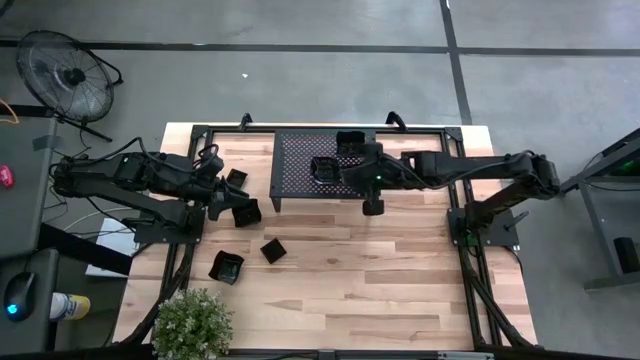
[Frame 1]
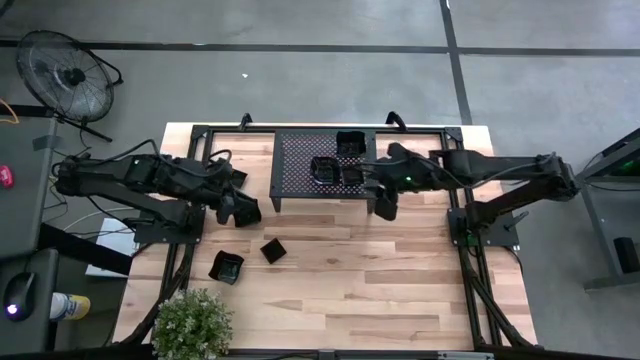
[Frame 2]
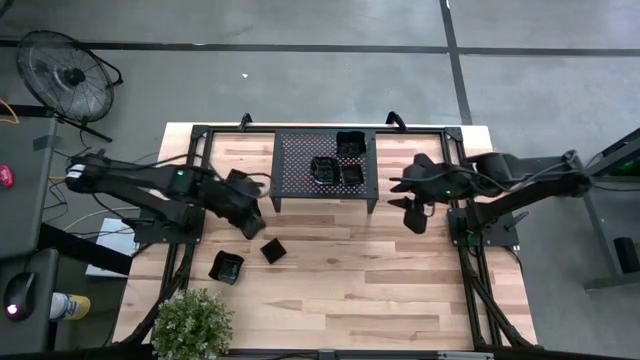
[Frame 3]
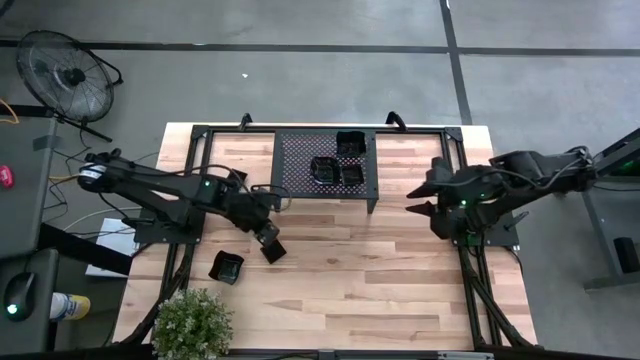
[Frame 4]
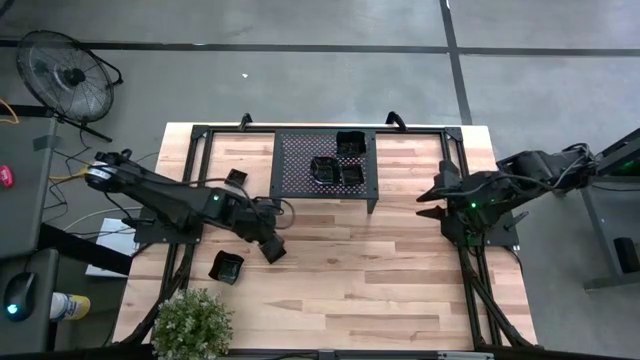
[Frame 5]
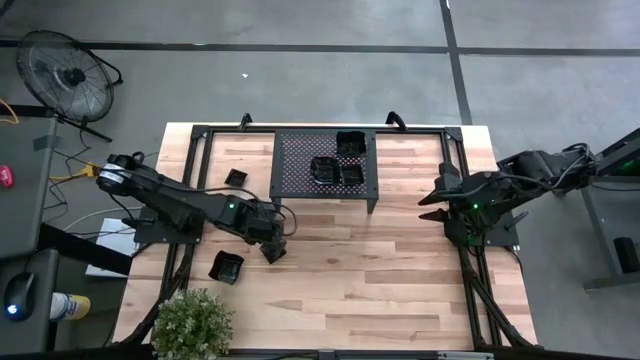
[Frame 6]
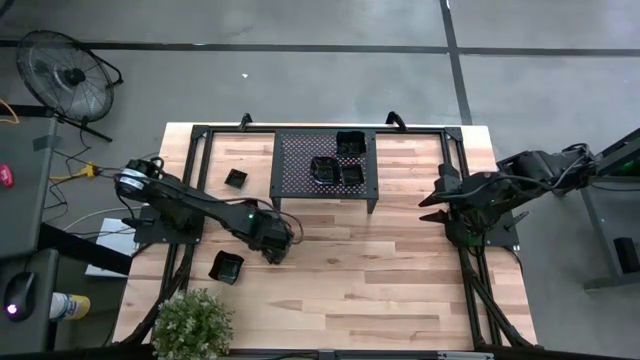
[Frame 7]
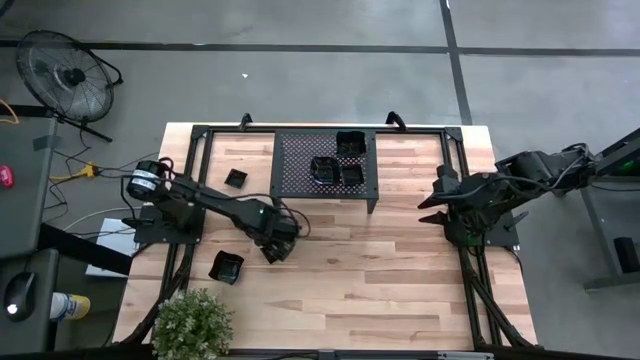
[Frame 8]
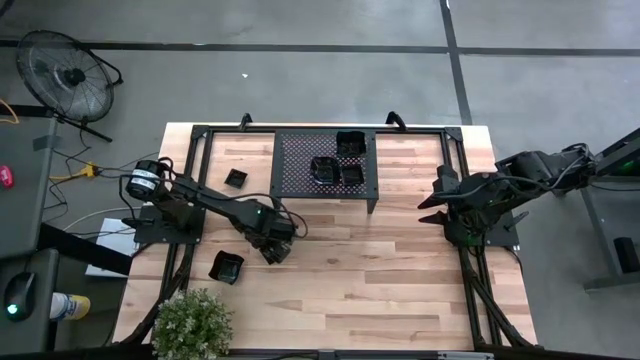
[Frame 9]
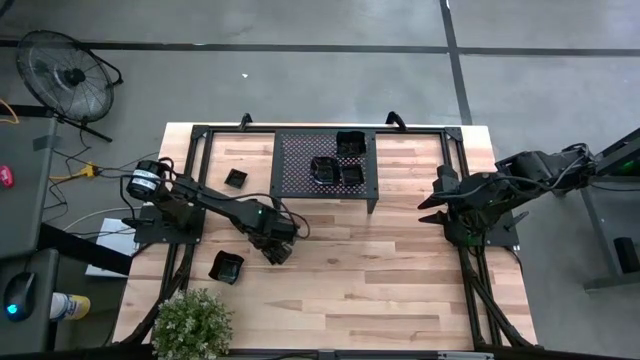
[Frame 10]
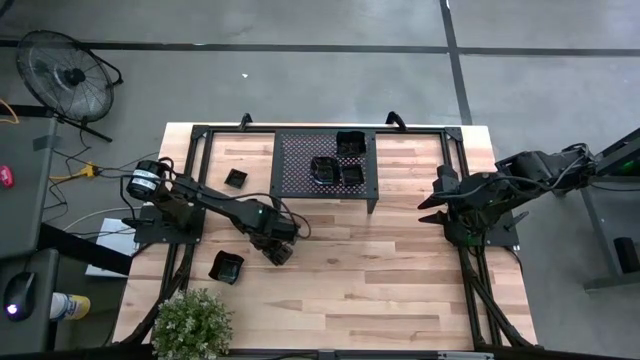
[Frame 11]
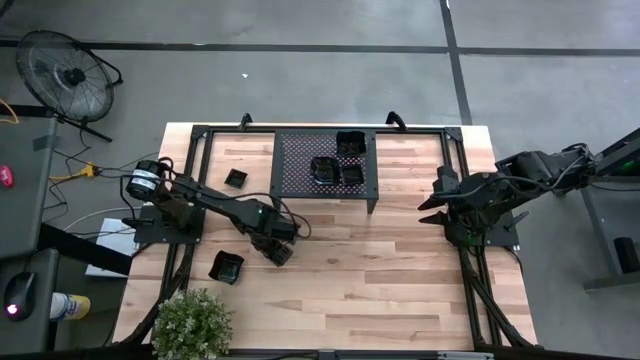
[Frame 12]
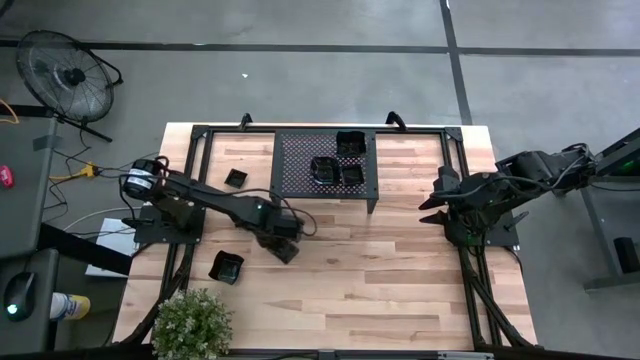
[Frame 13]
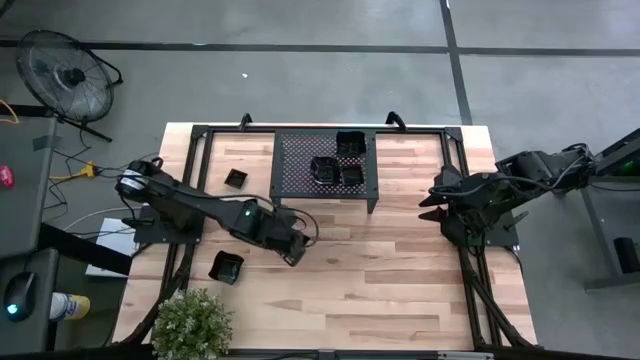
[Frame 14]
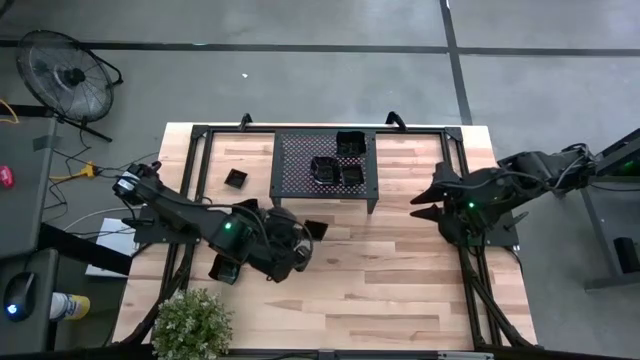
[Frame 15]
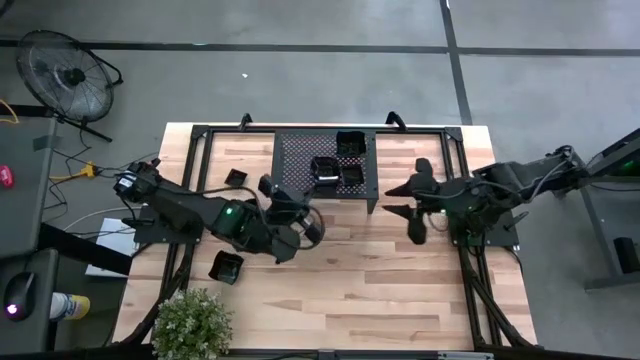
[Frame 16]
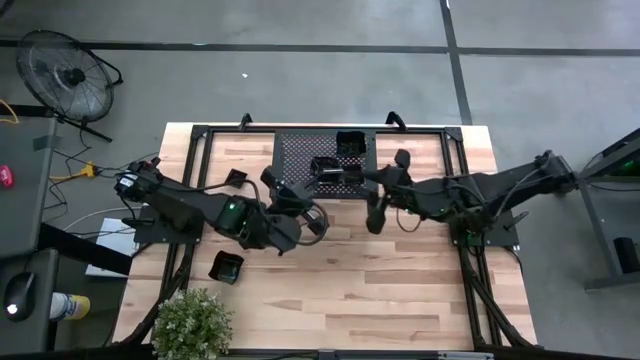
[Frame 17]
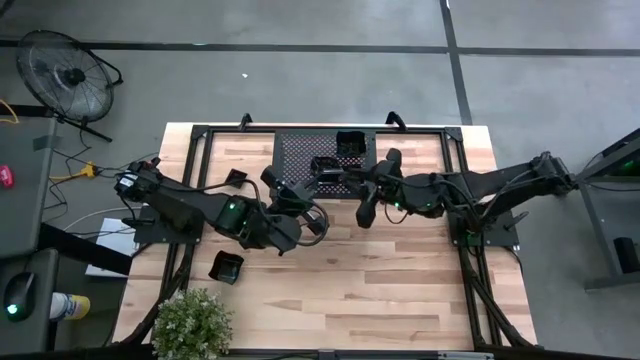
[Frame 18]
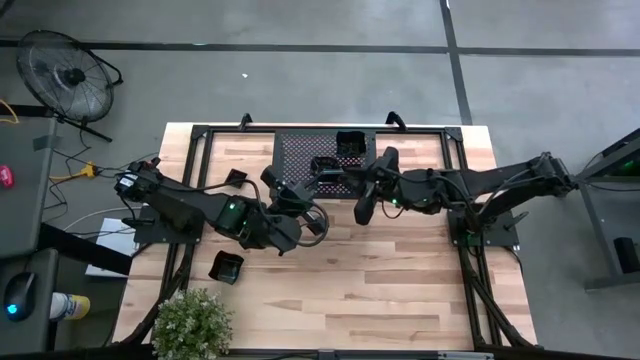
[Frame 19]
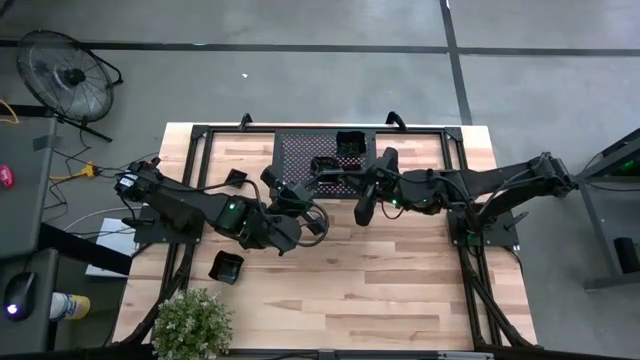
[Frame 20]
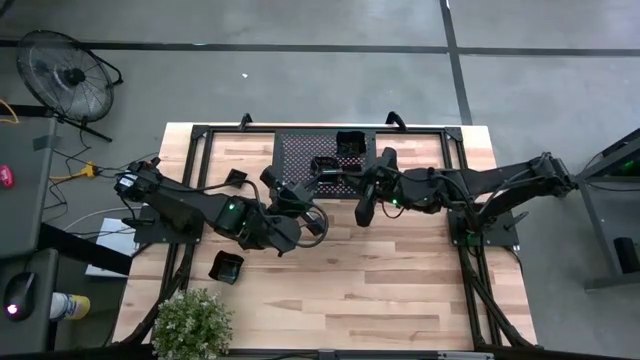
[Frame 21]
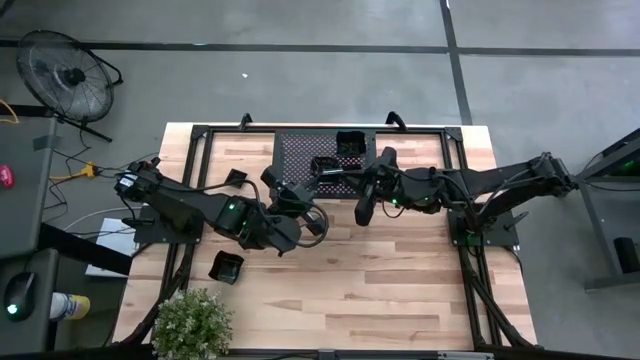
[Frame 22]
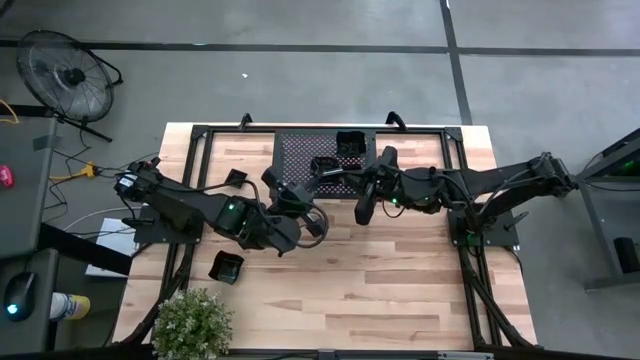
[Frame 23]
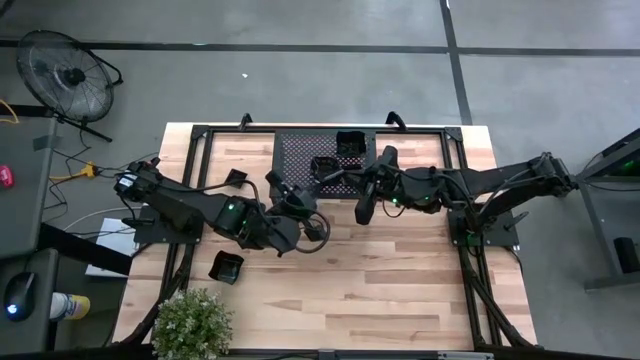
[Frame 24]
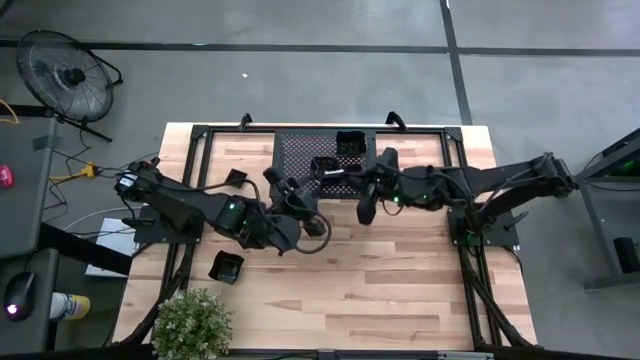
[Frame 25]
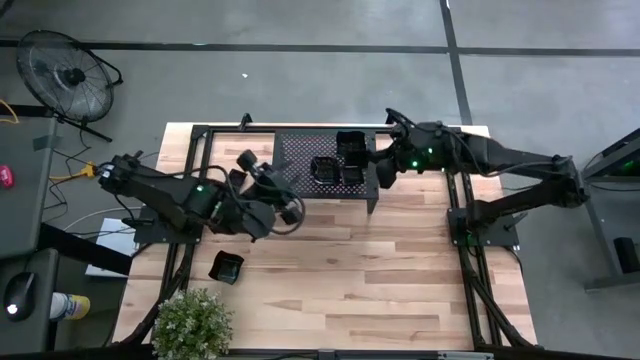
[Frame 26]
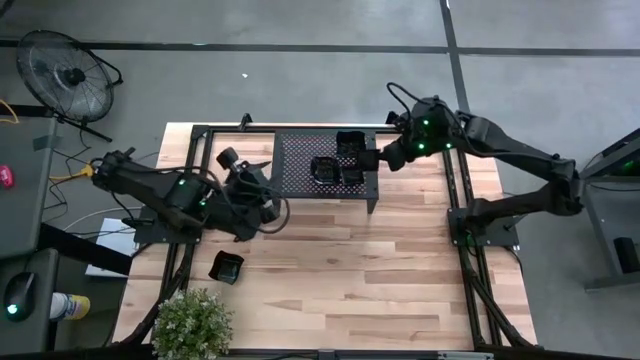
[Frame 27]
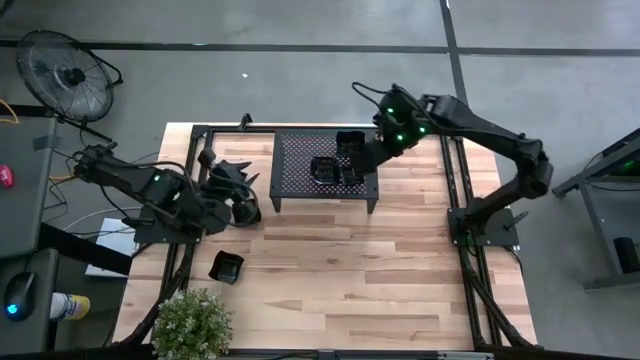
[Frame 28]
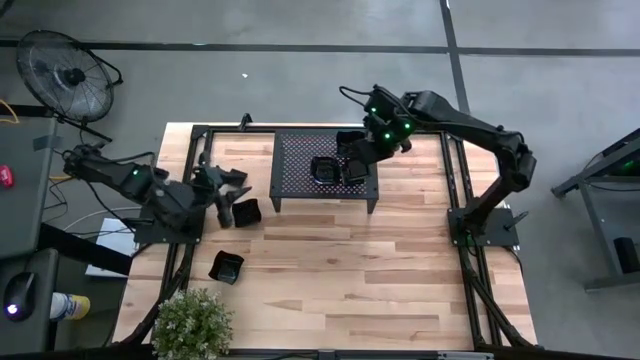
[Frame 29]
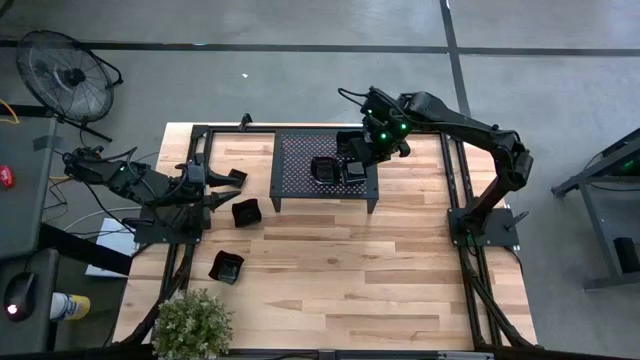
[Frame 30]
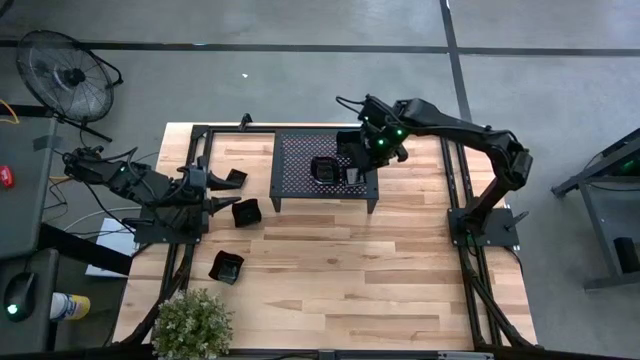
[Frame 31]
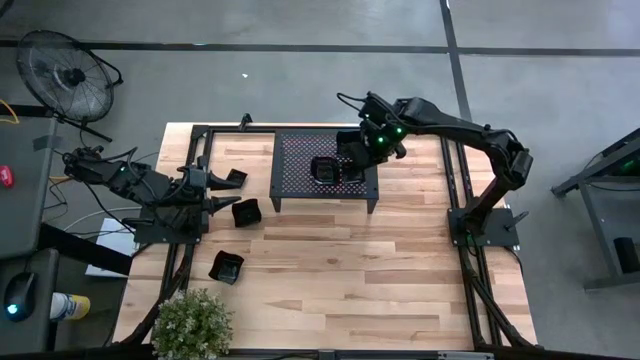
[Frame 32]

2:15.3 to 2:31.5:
Task: Pick & Place Mini shaped plates
Stack the black square plate on top of the other black square plates on the shelf

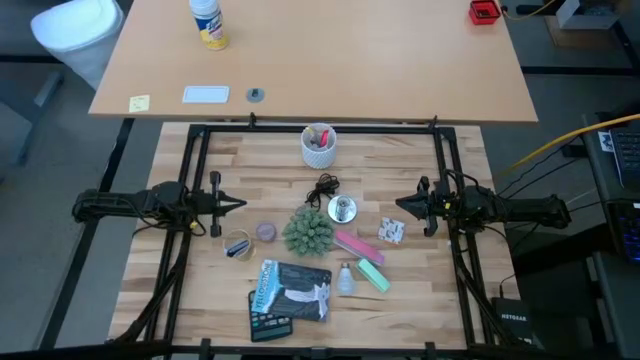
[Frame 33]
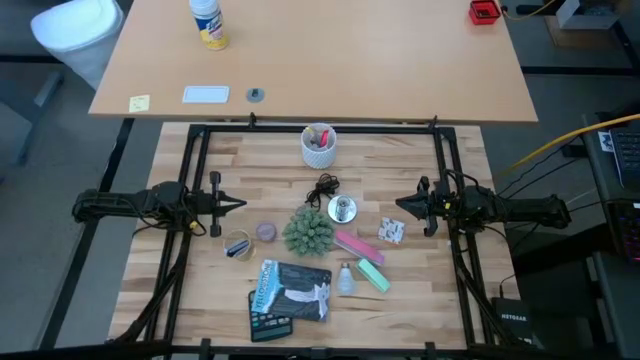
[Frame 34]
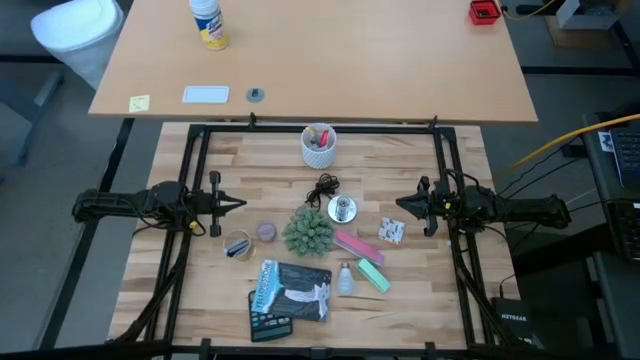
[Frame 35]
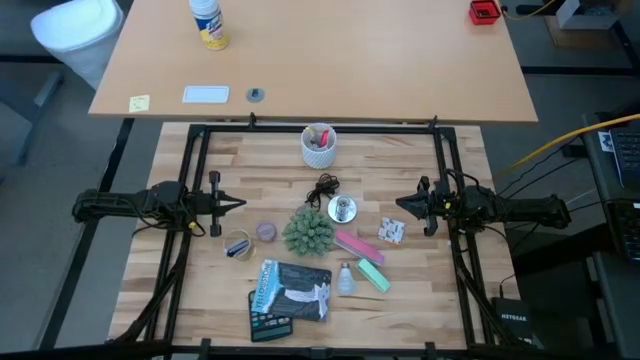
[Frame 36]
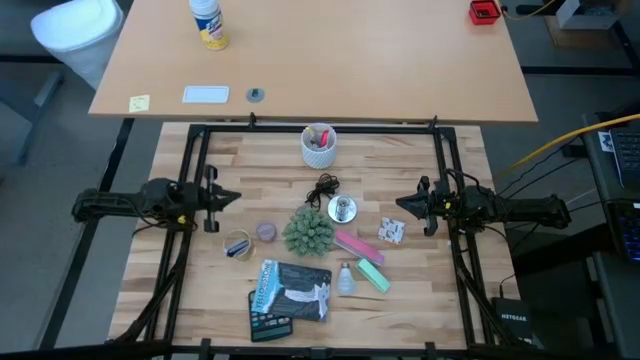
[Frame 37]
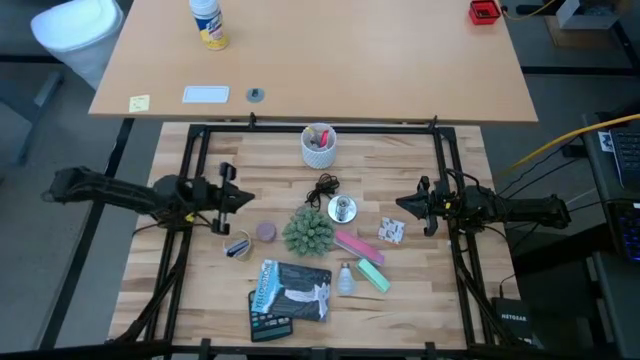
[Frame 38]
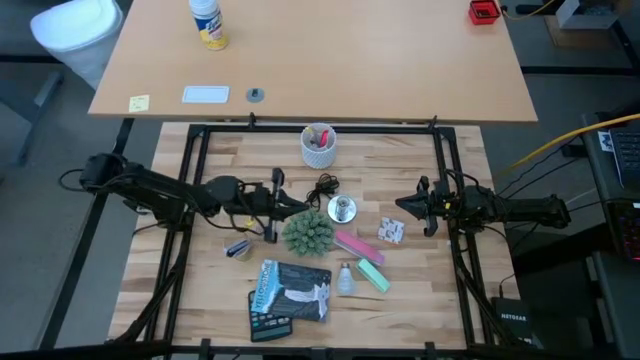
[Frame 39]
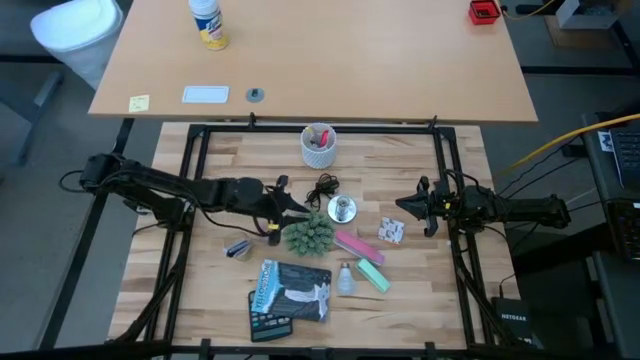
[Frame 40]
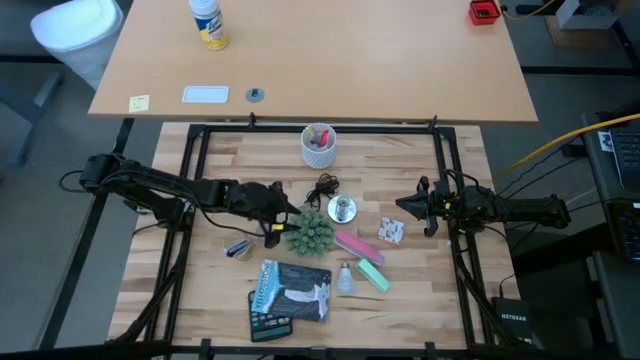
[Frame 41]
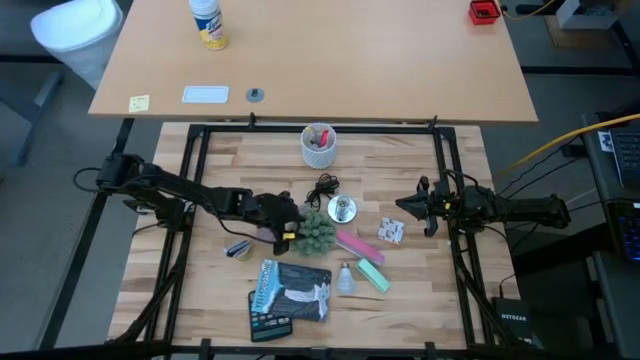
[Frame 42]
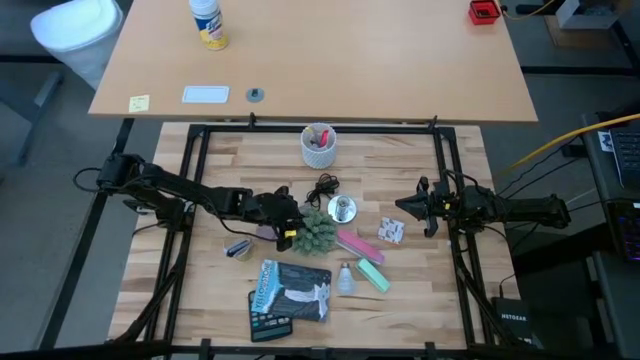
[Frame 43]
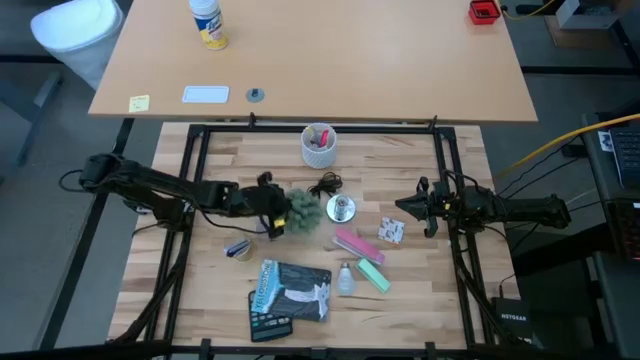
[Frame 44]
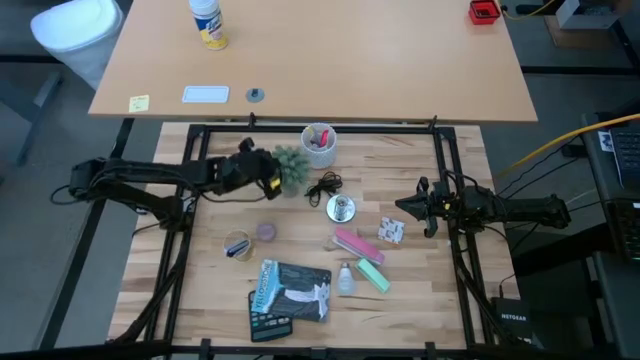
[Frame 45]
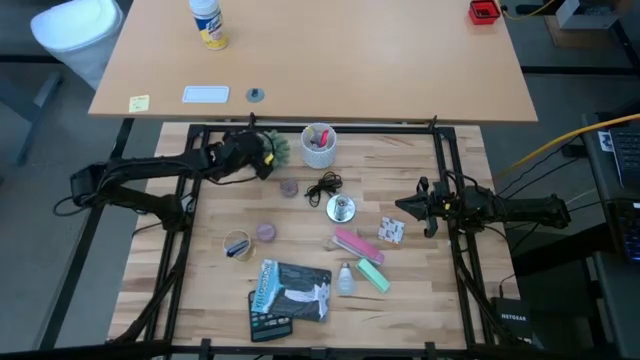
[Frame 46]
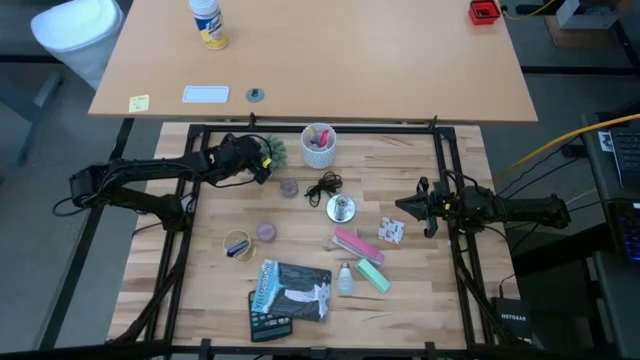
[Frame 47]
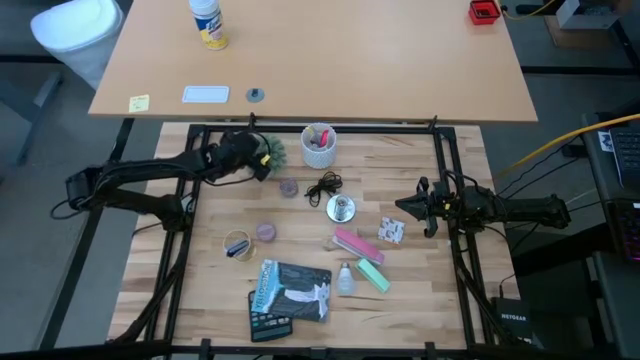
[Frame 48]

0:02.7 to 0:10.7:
Task: Screw lightbulb
Move the artificial plant to the upper right
